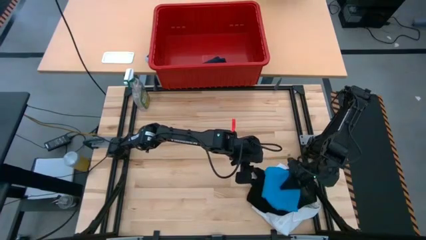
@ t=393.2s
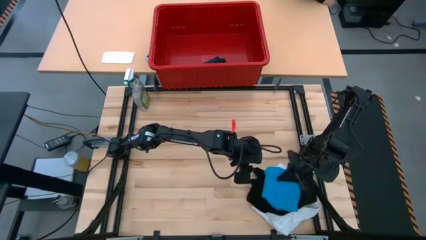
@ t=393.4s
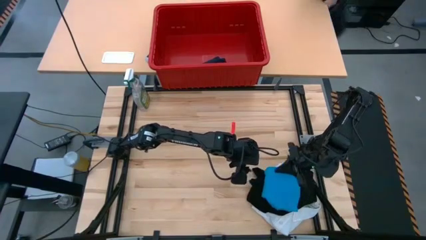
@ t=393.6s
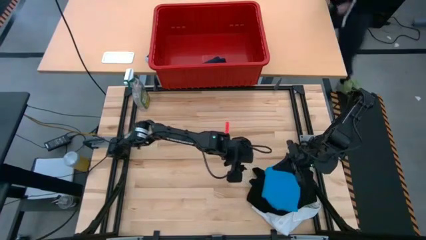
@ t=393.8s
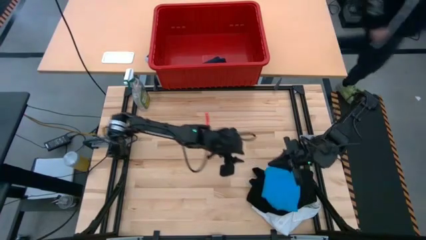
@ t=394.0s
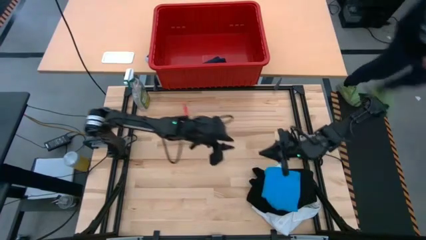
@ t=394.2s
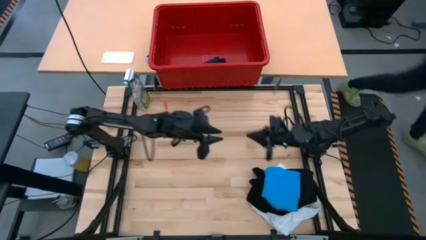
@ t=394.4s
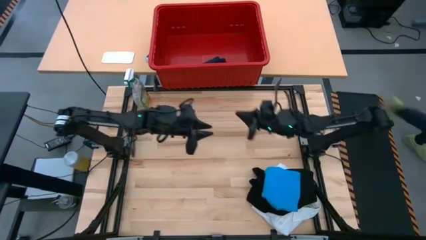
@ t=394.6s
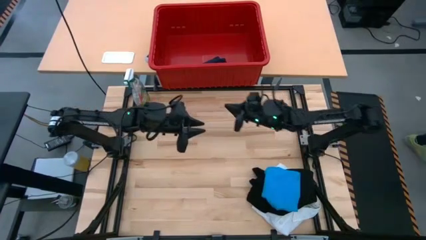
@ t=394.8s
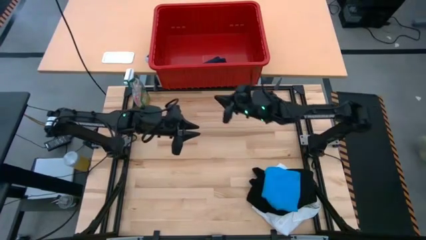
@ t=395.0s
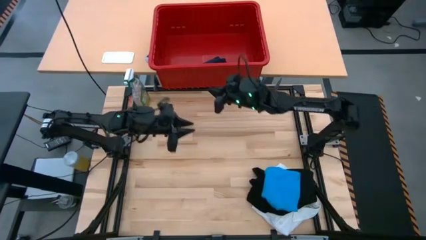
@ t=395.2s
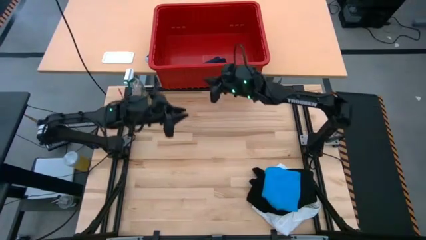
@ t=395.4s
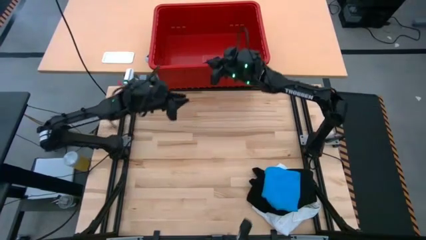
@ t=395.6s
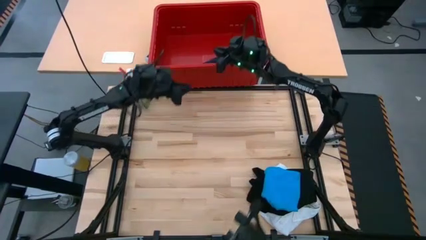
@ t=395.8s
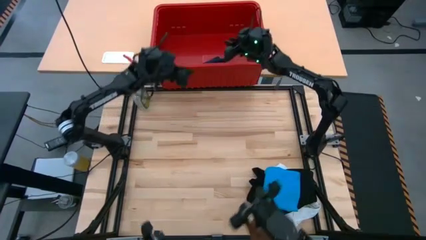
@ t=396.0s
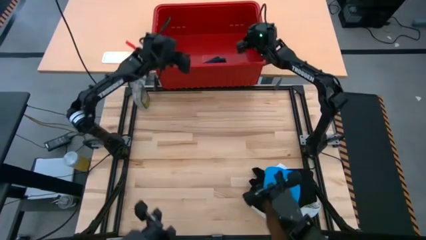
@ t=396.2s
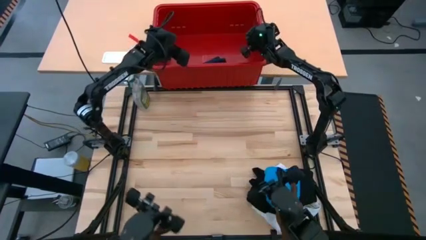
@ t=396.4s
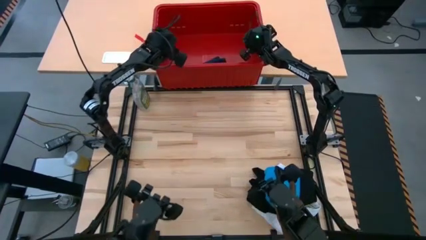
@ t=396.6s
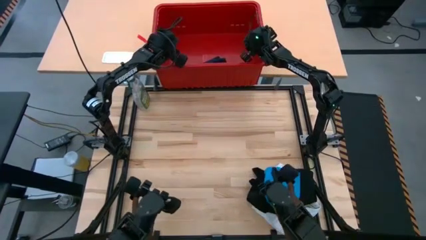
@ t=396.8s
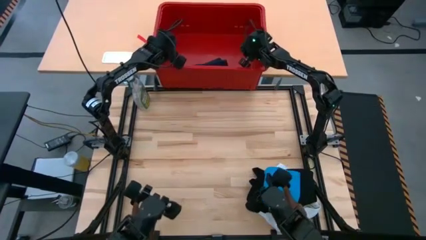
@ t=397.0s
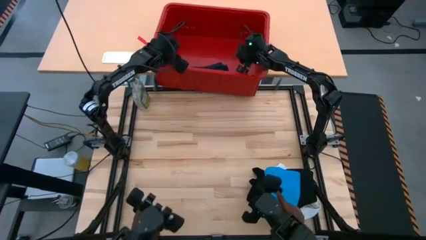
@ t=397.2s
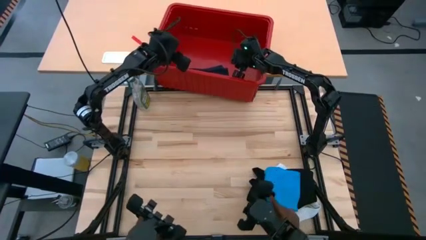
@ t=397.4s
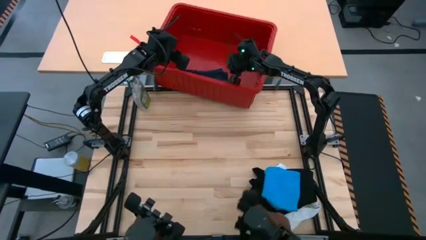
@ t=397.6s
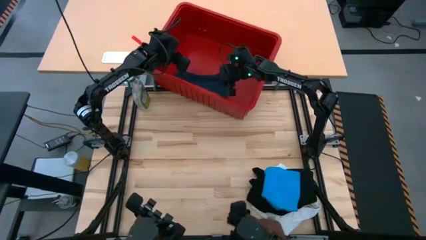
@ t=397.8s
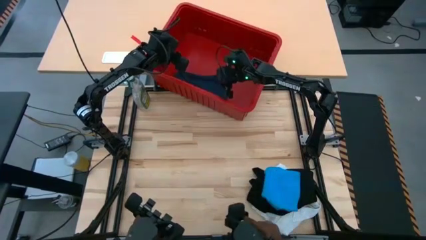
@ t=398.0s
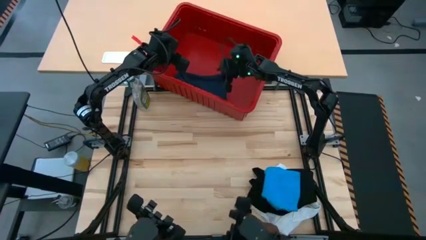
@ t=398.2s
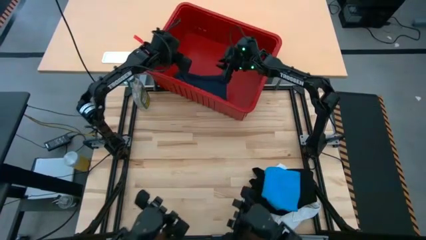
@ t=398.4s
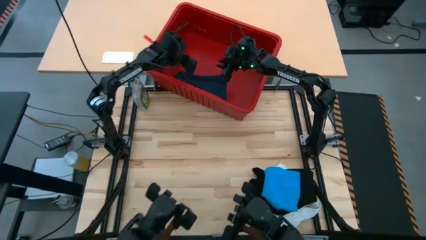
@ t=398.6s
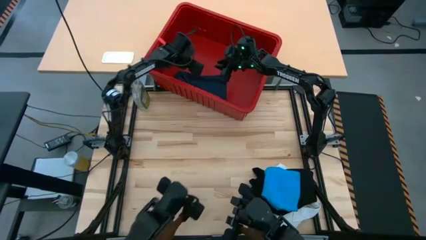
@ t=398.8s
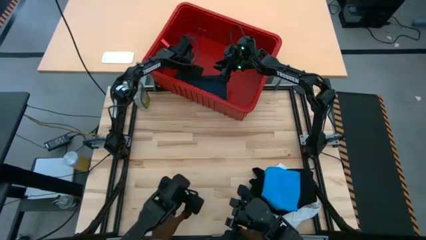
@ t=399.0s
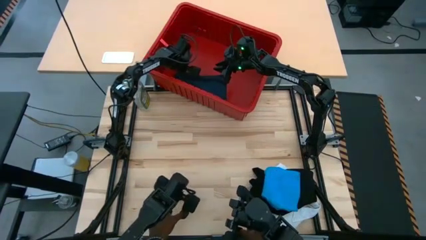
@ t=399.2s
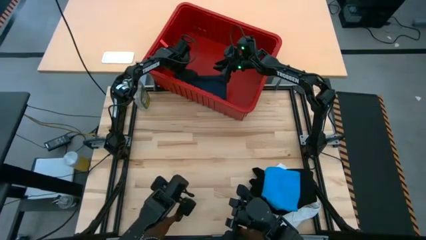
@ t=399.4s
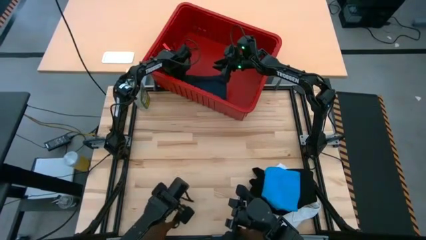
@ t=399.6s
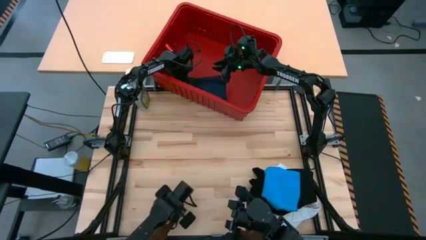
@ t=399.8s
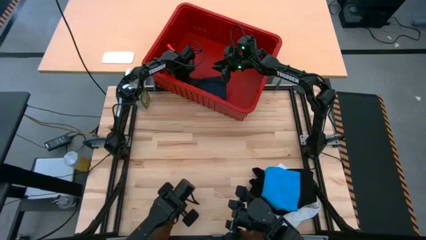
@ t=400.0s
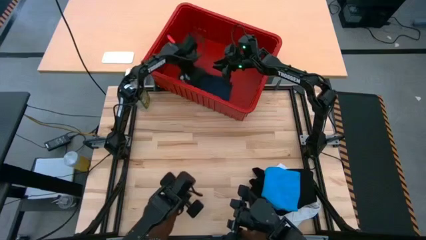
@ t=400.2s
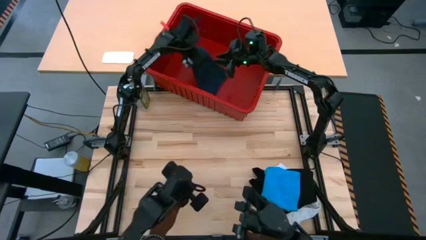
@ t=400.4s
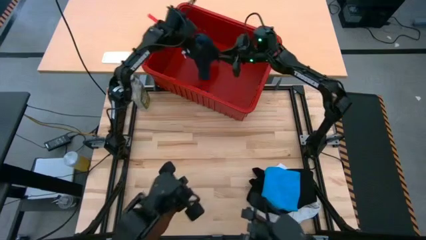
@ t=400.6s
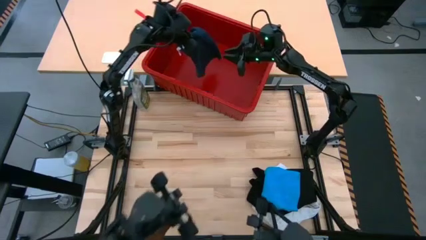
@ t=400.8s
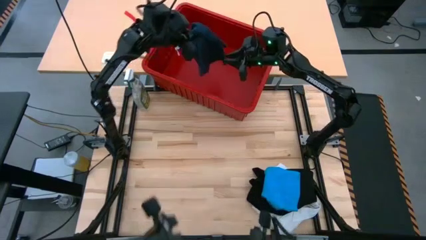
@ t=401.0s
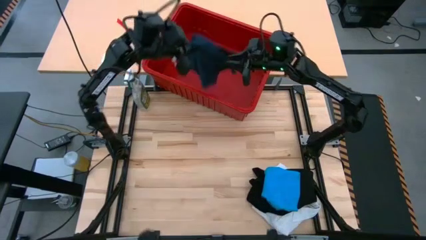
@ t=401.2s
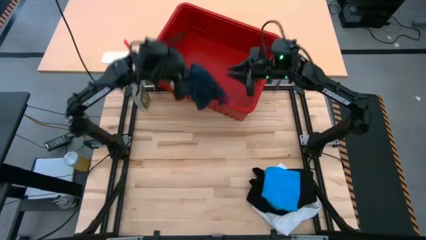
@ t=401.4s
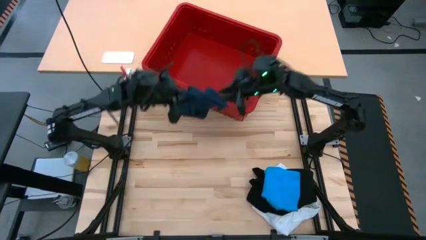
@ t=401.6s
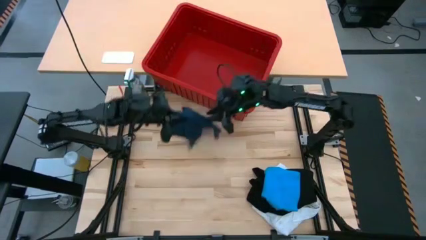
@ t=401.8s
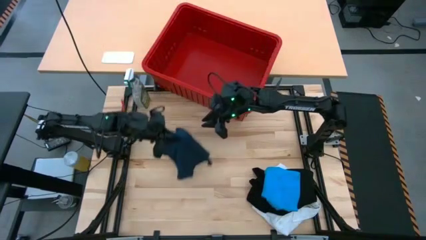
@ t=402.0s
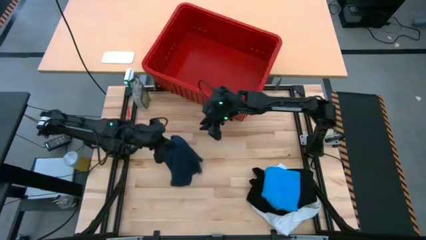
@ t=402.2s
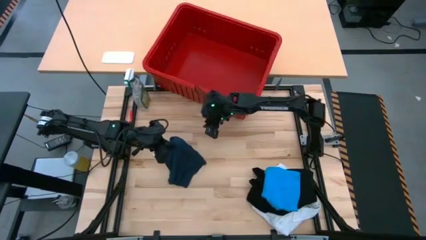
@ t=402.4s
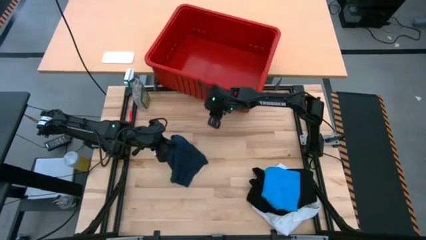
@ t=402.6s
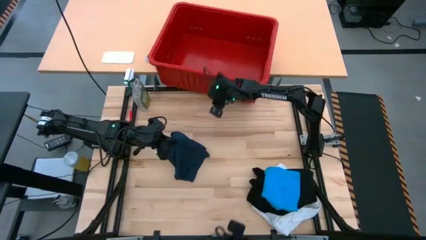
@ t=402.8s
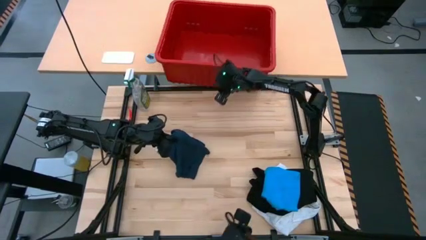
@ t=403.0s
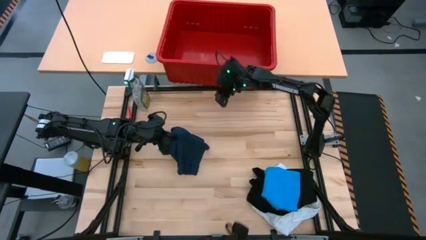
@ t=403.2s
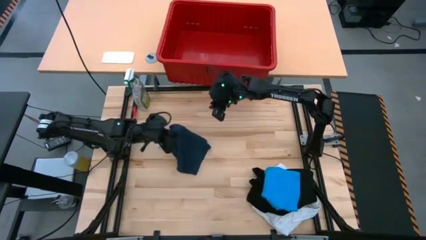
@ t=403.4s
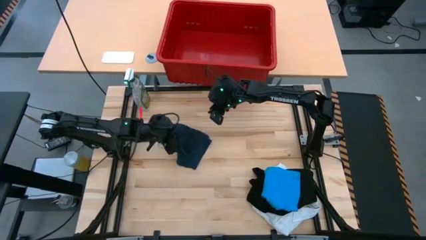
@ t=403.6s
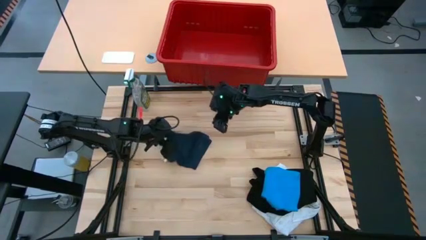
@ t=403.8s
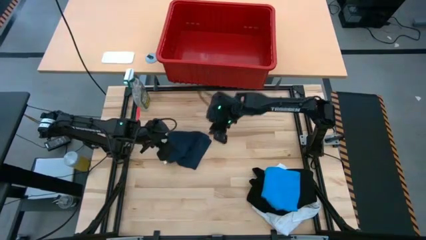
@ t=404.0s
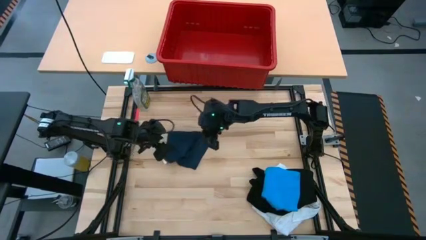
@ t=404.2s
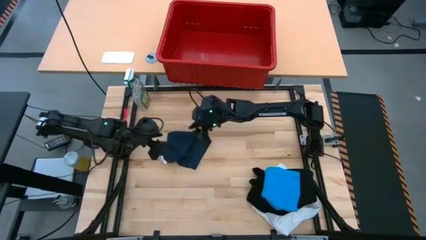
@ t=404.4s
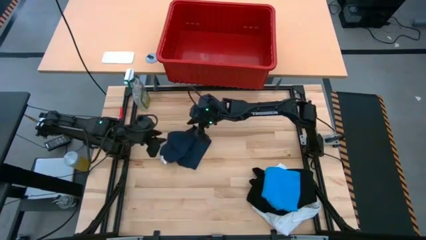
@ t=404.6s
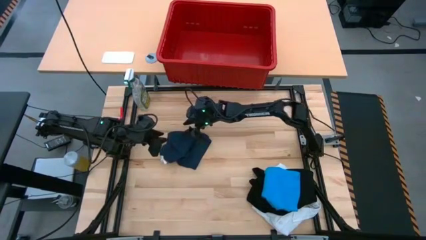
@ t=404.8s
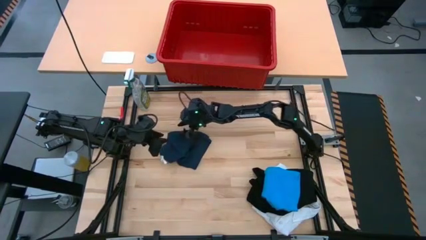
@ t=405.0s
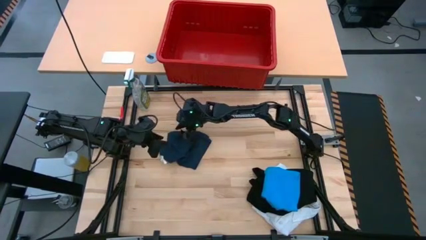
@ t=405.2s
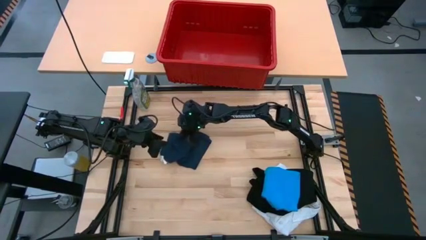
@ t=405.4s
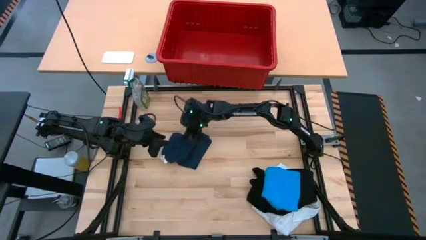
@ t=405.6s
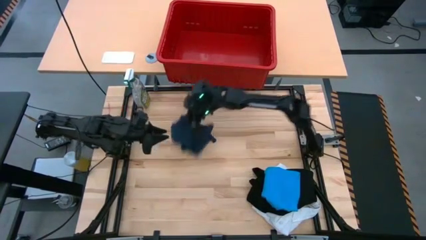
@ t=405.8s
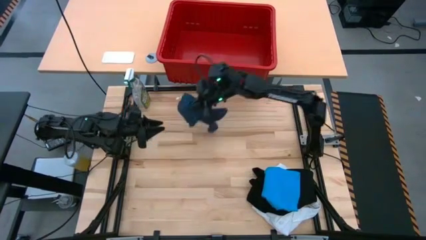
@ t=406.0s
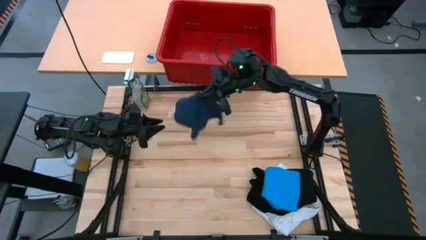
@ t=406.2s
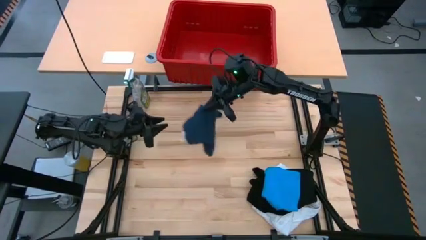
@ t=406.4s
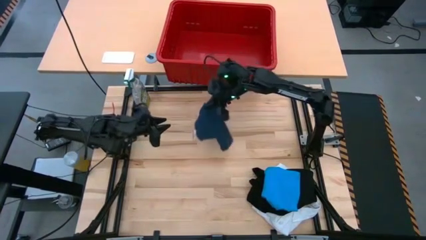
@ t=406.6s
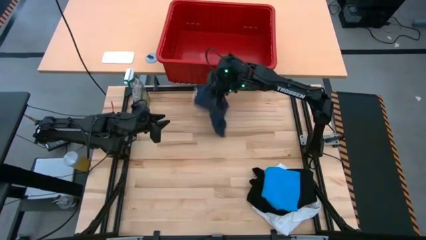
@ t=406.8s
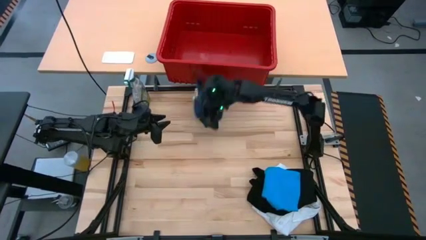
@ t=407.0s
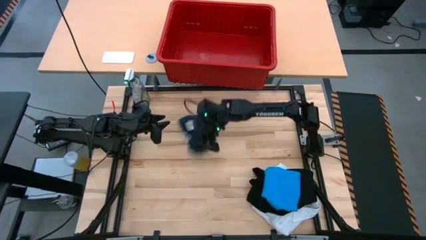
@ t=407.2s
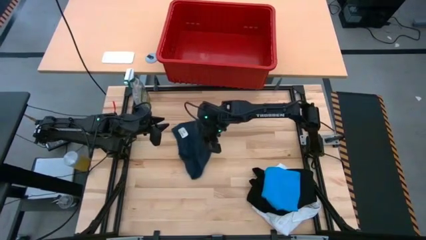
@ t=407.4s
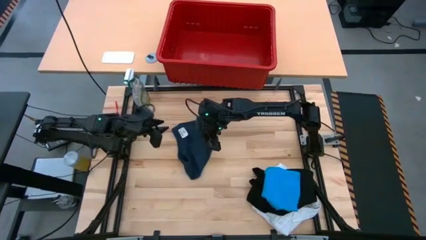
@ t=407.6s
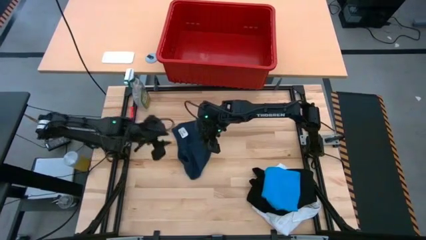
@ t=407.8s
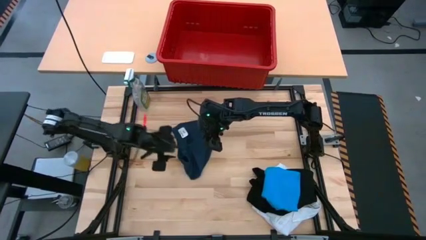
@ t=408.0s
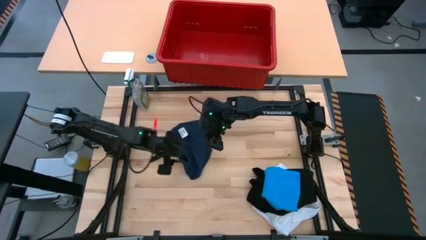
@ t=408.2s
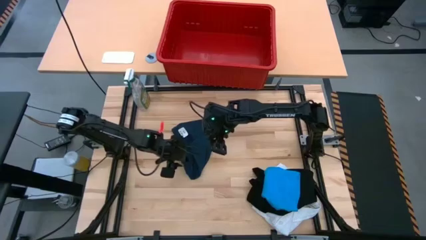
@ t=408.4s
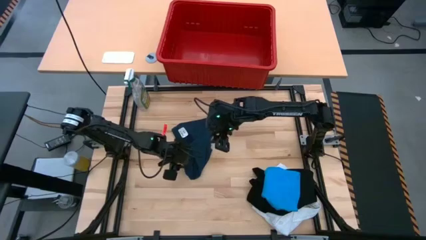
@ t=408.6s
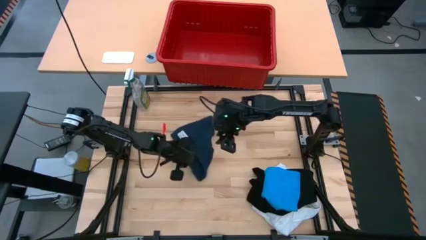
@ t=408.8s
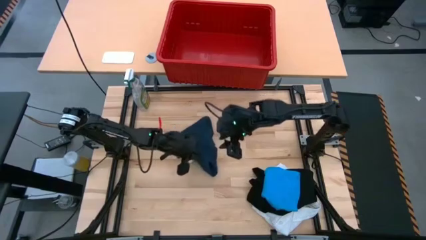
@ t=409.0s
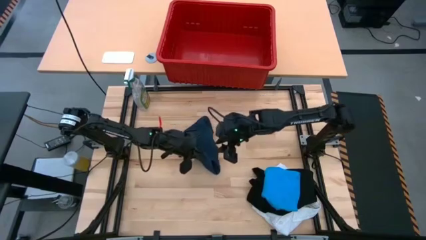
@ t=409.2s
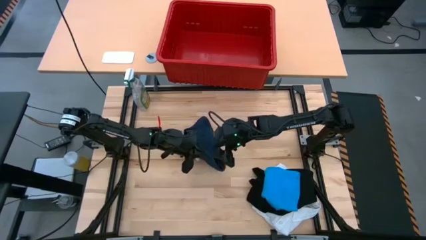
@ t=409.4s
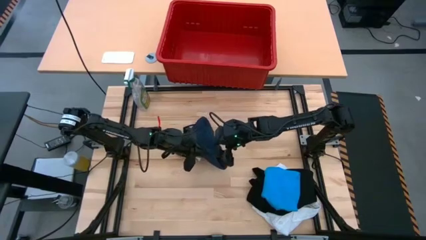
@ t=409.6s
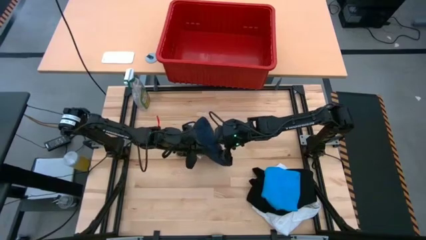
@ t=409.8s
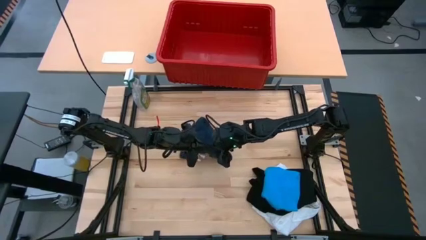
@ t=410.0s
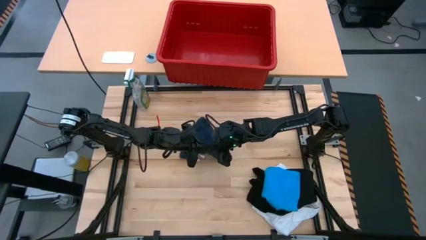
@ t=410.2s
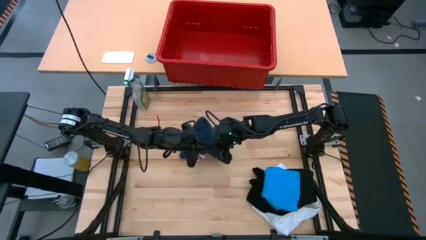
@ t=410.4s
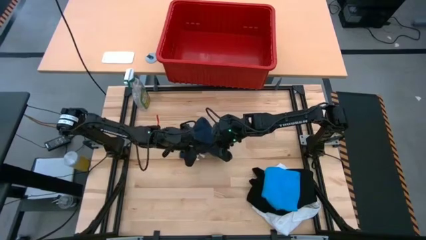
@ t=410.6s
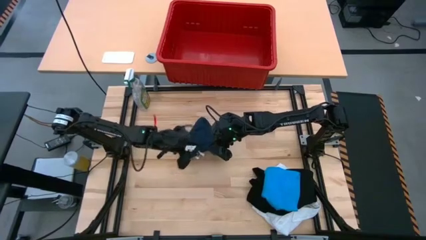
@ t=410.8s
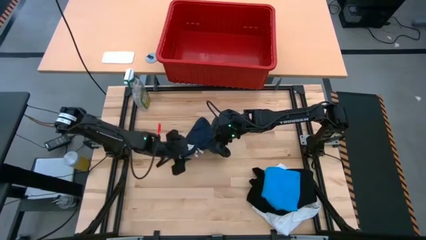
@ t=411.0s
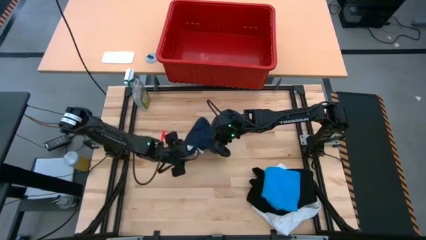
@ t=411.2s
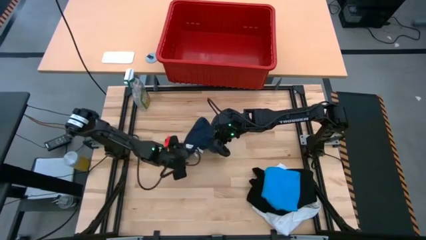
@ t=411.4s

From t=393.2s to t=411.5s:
Task: Fold laundry
Fold the dark blue shorts
